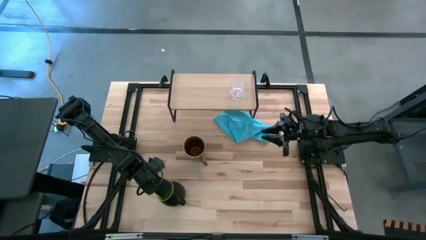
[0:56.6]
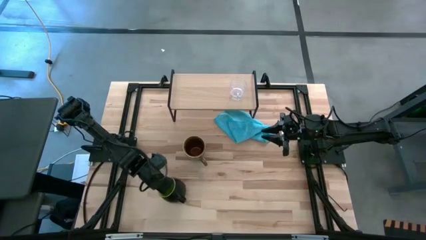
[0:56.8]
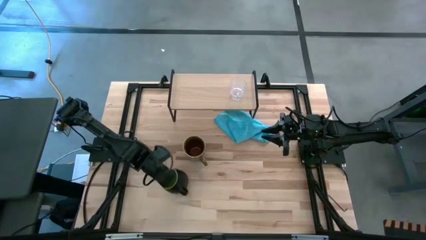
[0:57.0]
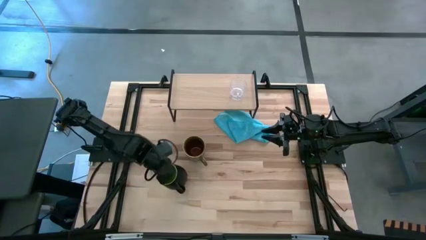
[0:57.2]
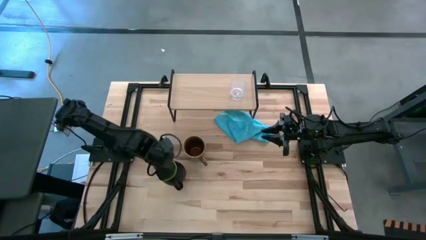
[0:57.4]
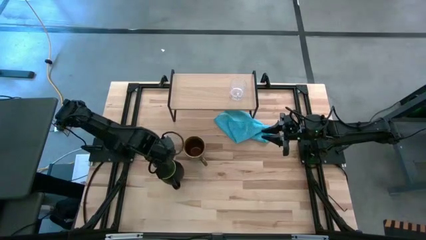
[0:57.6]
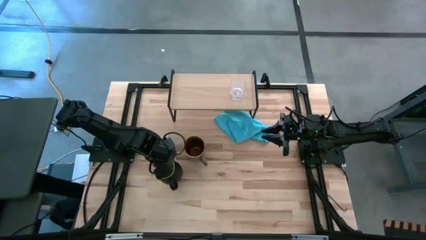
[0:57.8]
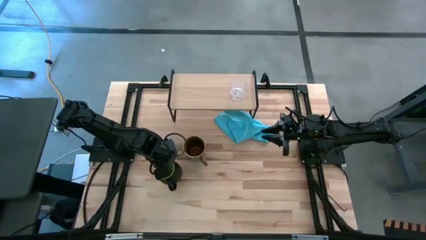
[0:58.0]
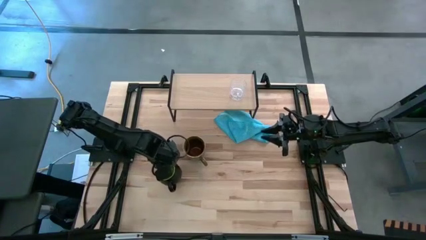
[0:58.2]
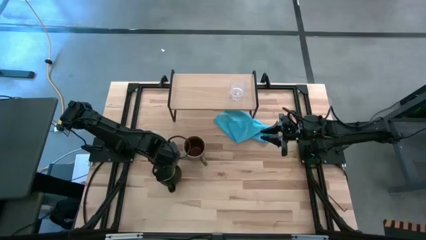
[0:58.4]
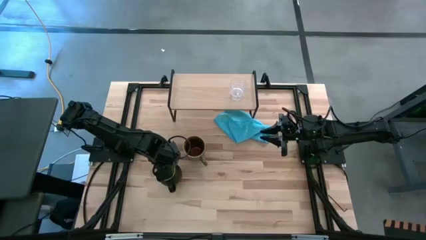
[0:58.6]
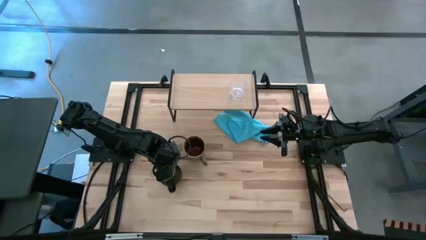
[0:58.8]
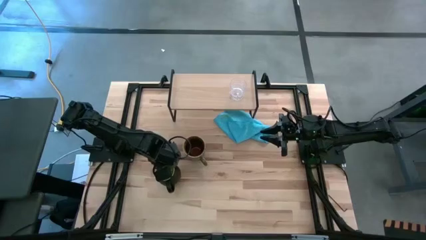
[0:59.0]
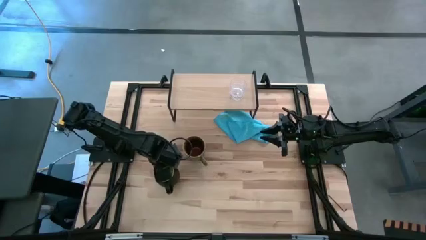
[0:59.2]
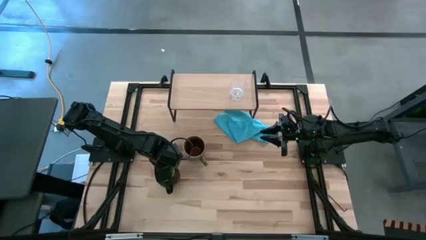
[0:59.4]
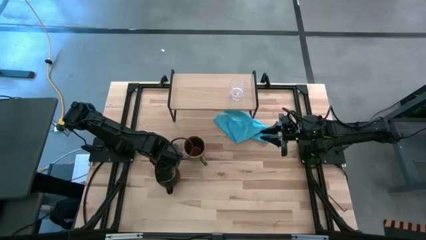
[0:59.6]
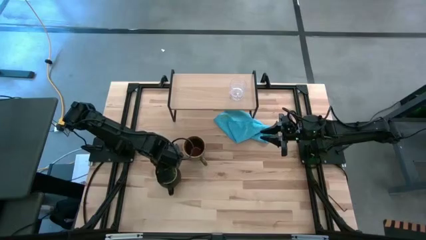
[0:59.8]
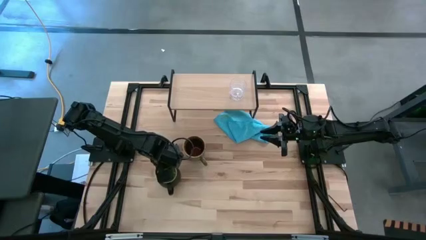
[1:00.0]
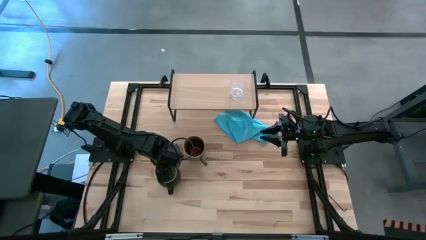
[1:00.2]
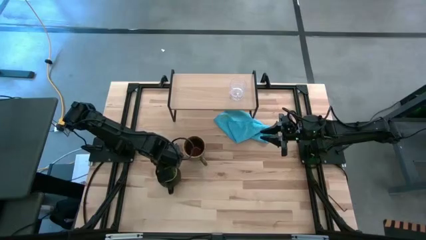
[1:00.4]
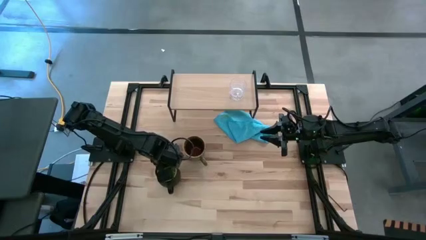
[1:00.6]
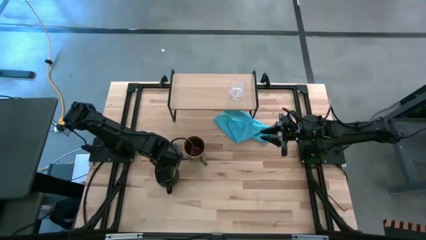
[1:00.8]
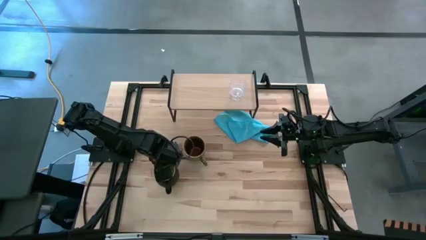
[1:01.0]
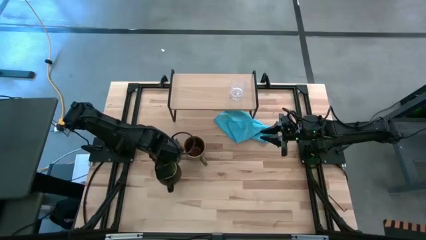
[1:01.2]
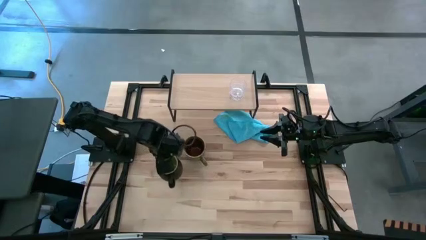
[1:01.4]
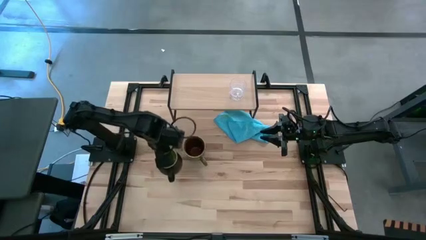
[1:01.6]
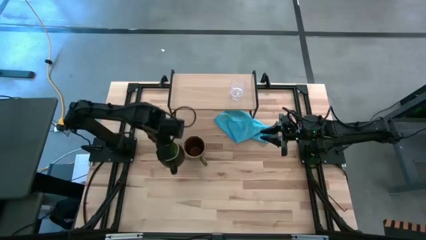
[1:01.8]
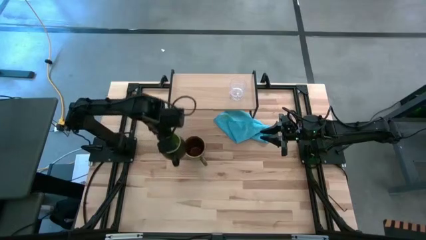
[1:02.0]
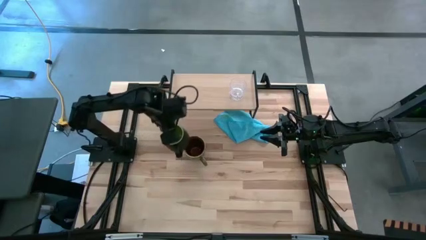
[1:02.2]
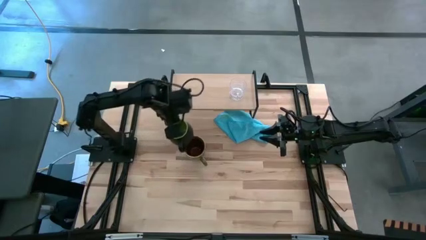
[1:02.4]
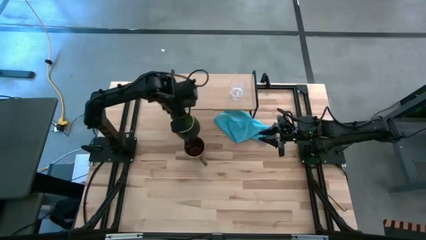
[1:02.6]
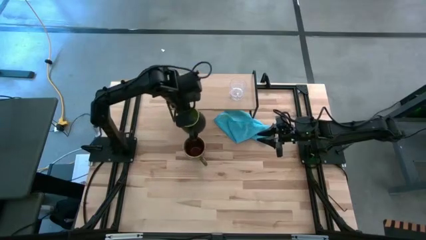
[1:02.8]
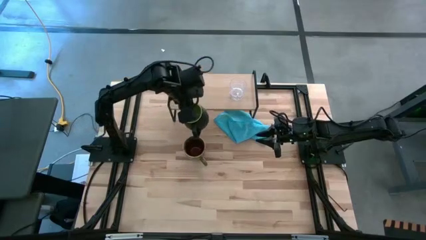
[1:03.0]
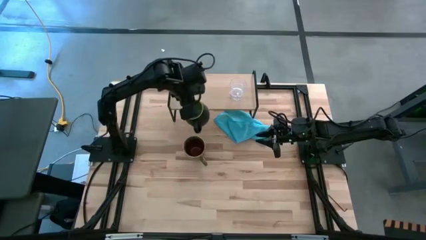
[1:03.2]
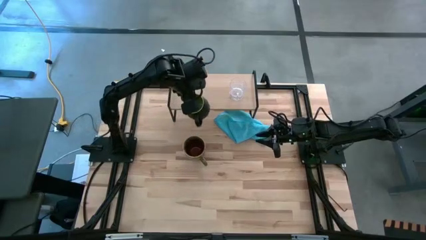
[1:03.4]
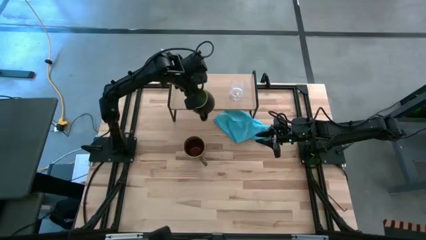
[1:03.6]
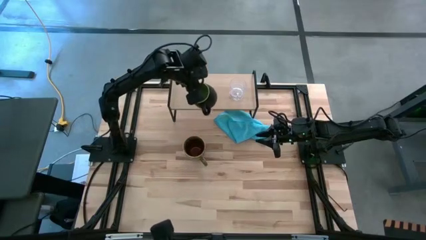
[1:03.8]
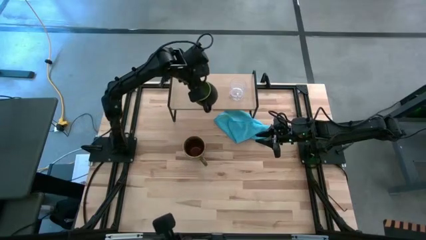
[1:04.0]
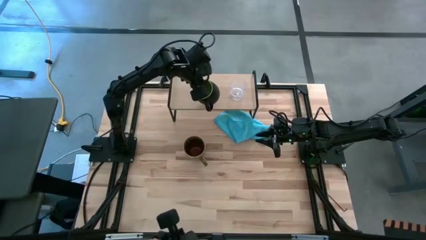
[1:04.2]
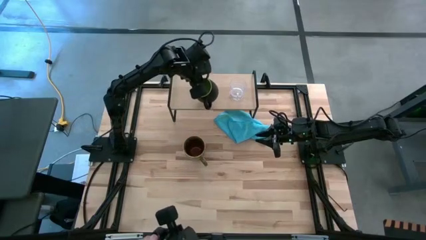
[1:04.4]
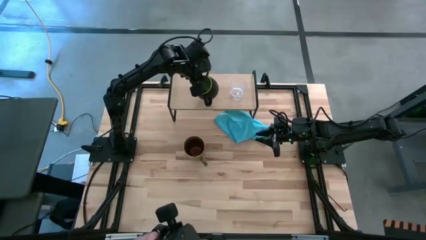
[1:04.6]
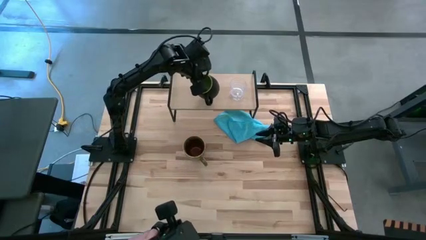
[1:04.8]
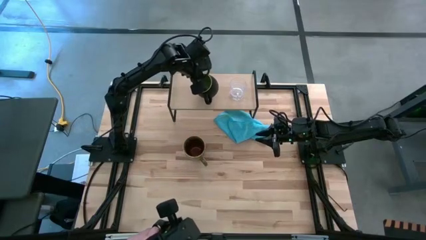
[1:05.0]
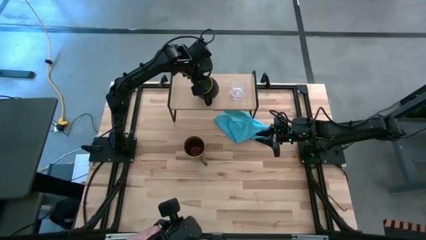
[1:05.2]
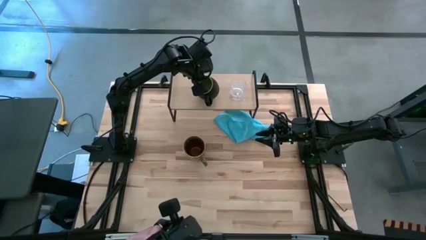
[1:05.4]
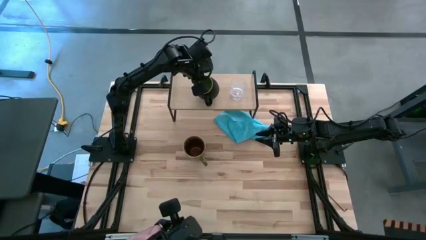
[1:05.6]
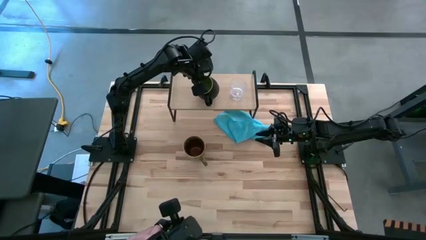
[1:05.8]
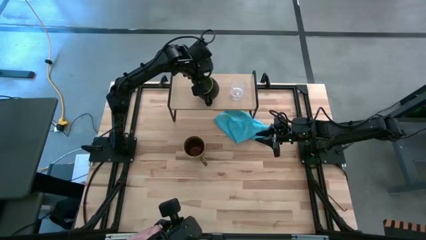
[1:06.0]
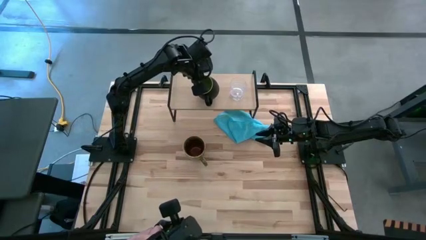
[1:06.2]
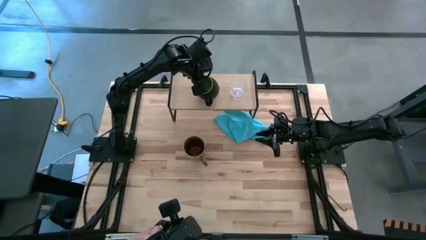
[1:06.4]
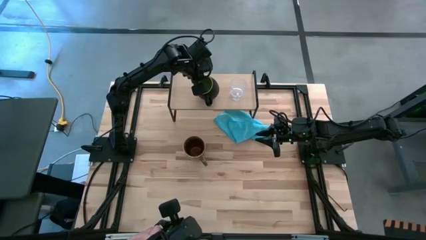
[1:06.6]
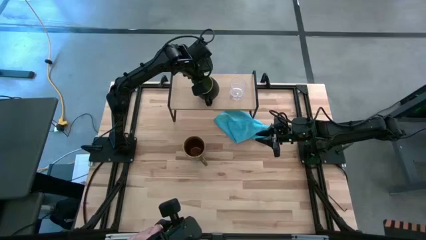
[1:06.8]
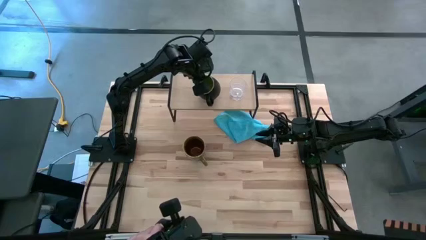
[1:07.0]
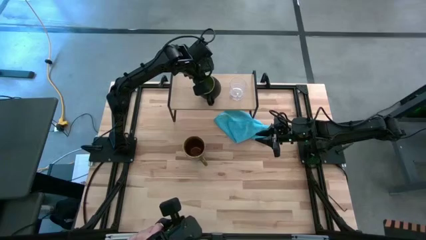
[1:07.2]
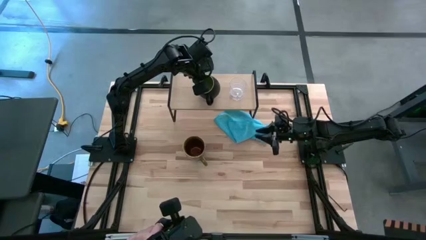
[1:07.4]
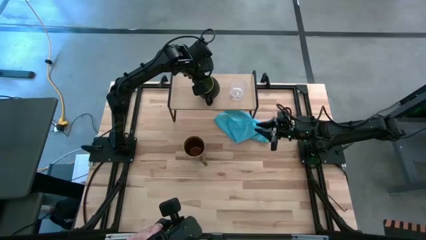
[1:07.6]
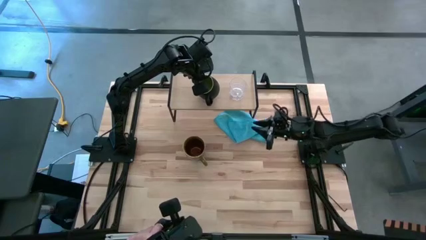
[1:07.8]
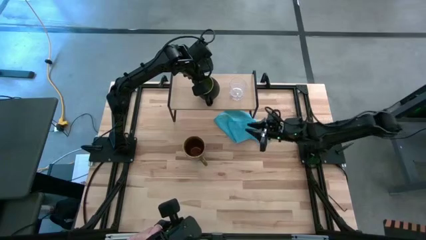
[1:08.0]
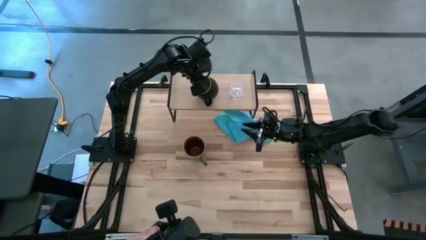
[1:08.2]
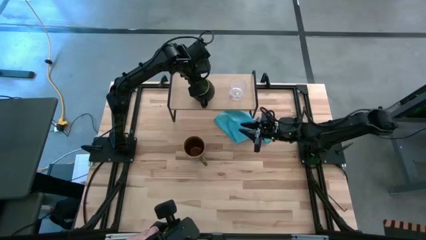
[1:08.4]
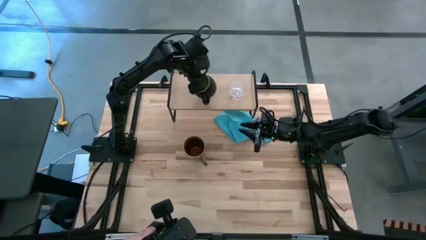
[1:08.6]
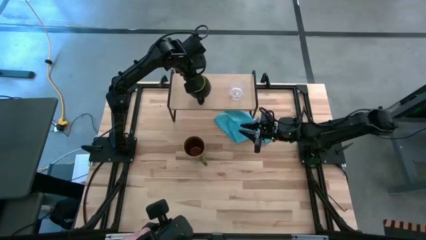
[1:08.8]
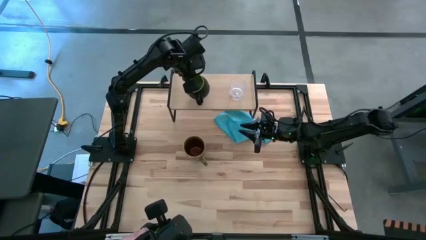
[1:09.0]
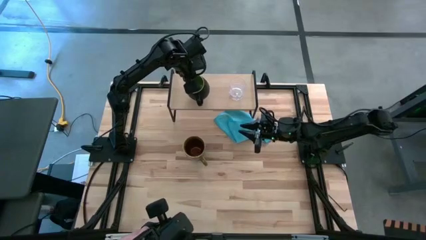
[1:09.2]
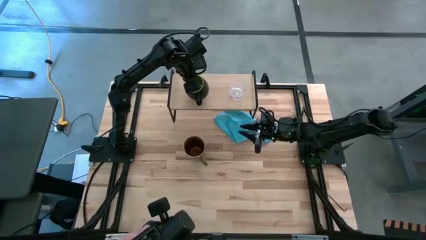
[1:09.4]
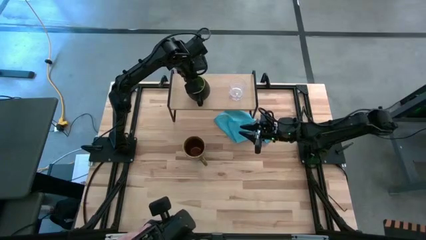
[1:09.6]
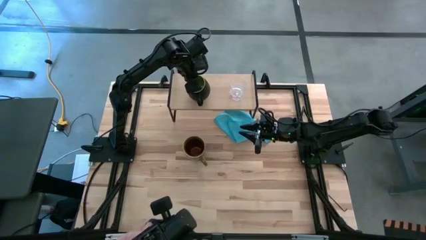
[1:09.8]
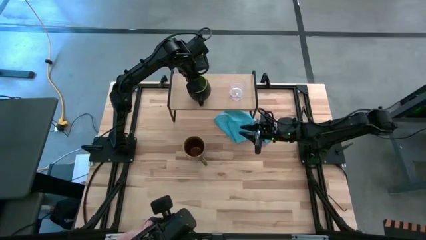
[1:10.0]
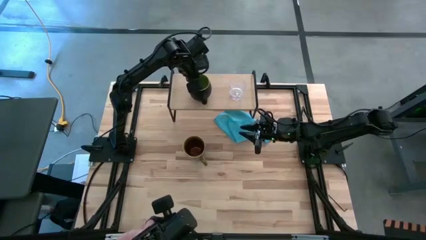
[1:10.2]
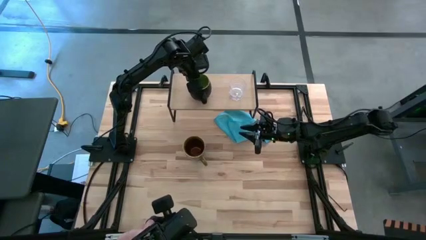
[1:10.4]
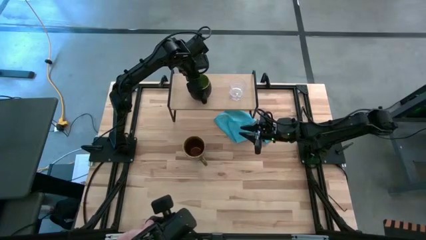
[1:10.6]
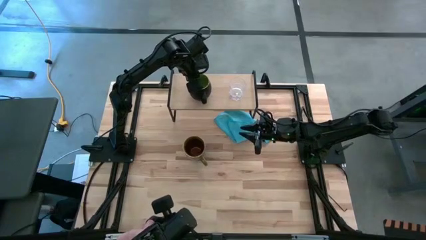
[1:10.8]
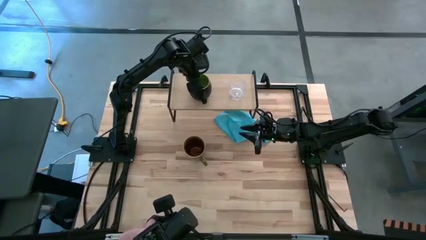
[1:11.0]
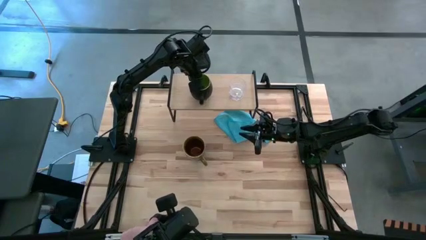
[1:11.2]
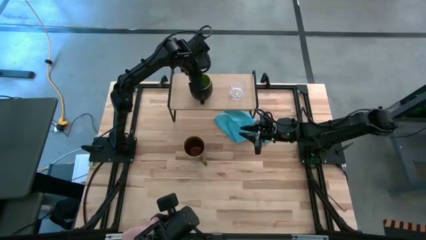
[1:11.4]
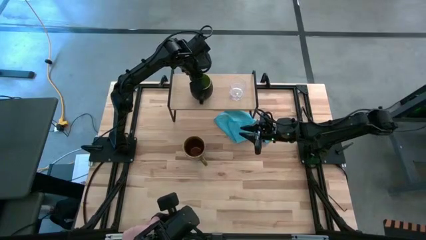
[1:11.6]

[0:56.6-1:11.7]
Task: Stack small to large cups/mugs on shelf
Put the black mug on the shelf

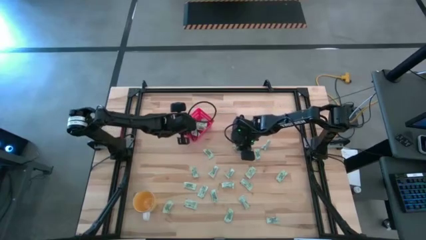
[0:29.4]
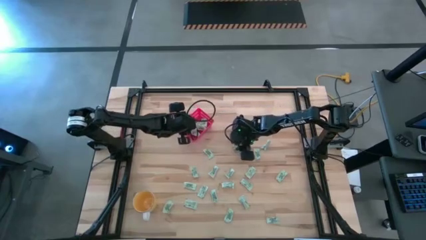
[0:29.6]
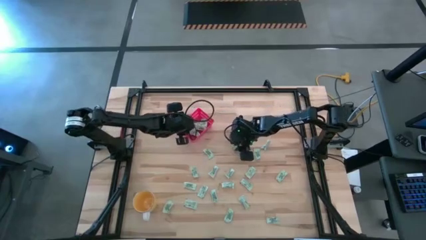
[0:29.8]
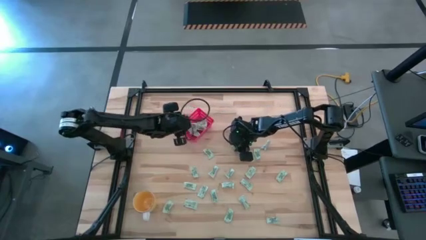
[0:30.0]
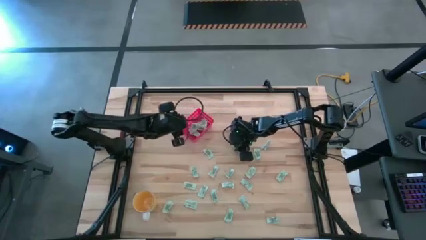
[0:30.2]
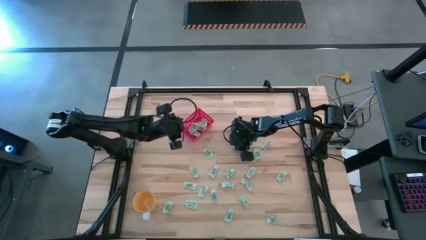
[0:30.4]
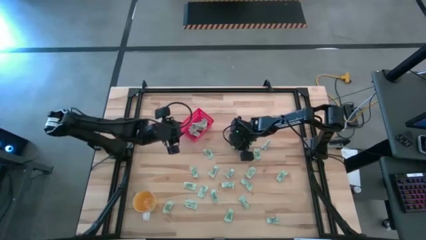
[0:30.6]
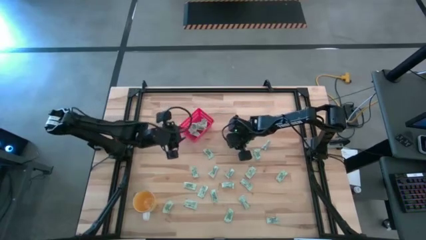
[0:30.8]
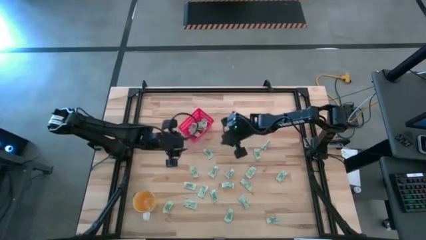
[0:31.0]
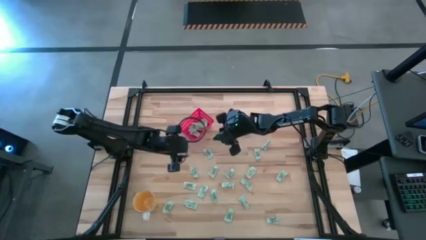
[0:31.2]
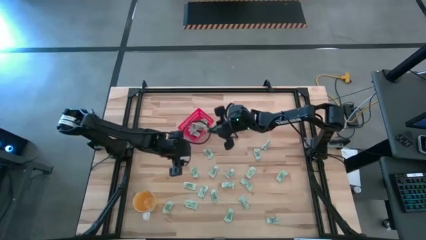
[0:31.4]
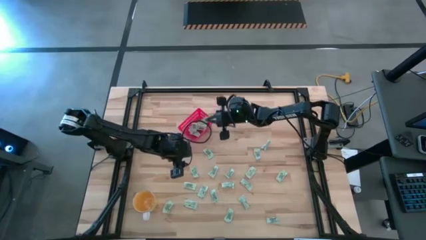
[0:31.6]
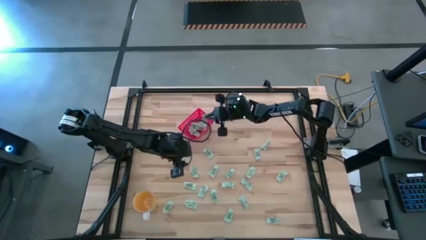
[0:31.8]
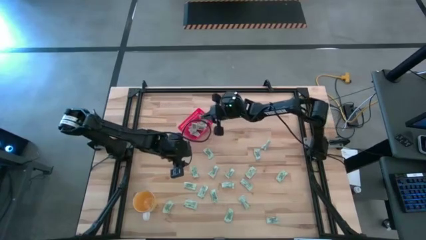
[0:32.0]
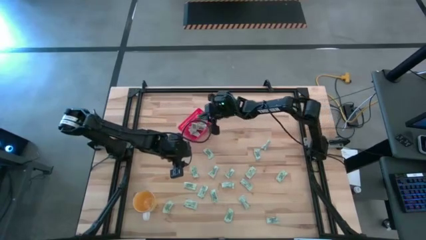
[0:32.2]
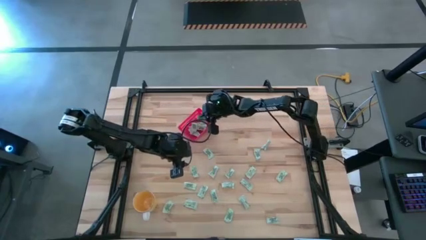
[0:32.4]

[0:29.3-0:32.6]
Task: Pick and place Stevia / Truvia into bins
Put the white stevia packet into the red bin
